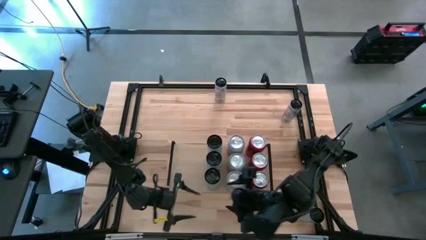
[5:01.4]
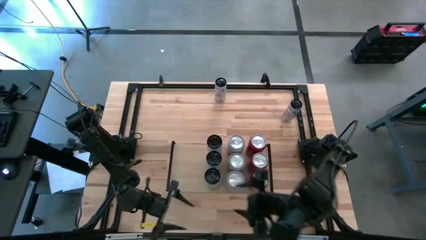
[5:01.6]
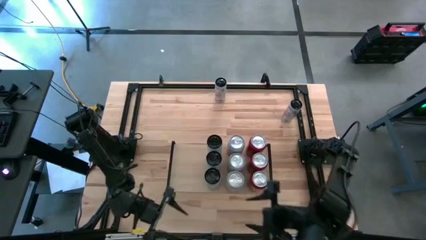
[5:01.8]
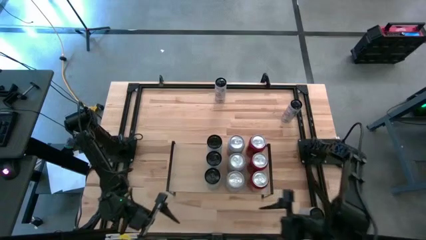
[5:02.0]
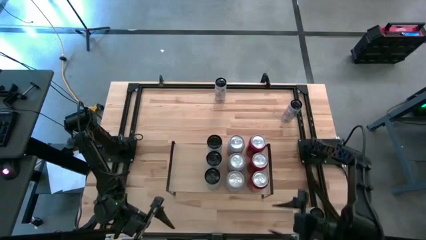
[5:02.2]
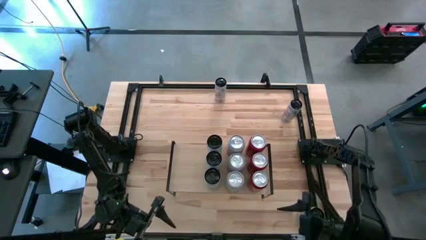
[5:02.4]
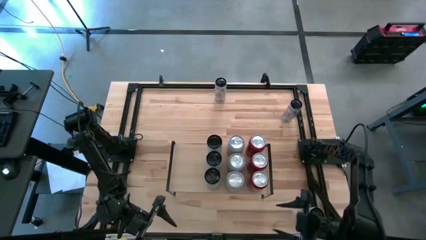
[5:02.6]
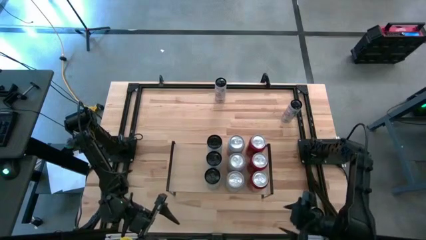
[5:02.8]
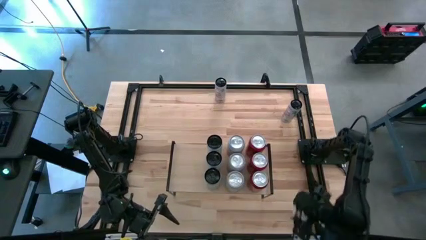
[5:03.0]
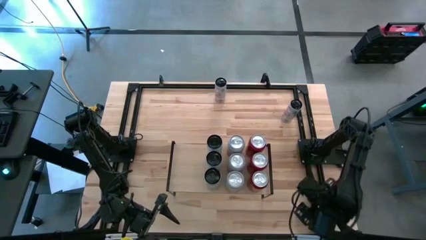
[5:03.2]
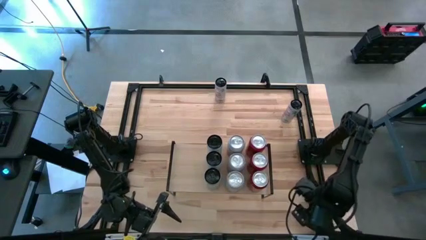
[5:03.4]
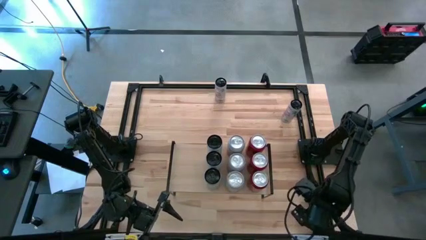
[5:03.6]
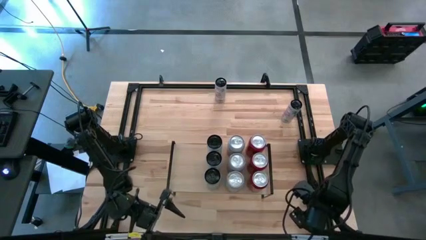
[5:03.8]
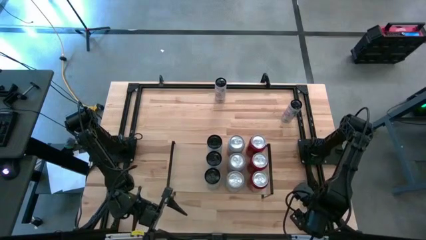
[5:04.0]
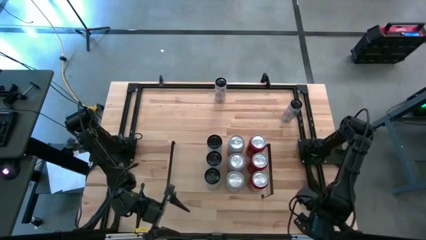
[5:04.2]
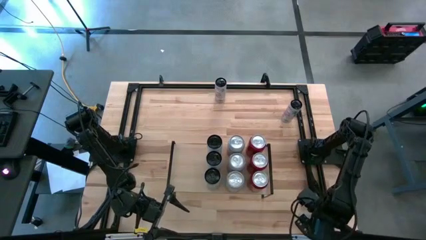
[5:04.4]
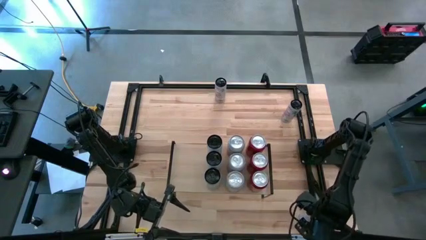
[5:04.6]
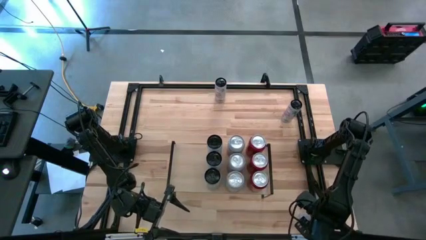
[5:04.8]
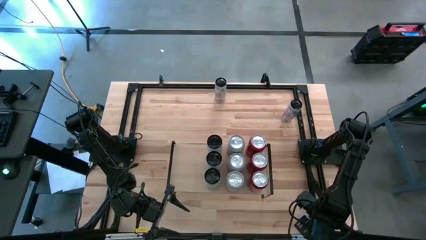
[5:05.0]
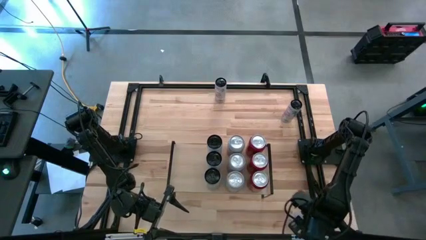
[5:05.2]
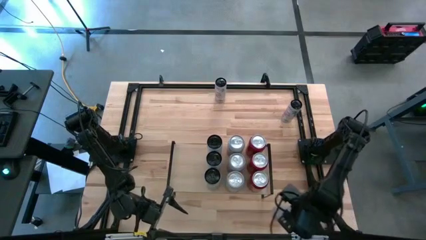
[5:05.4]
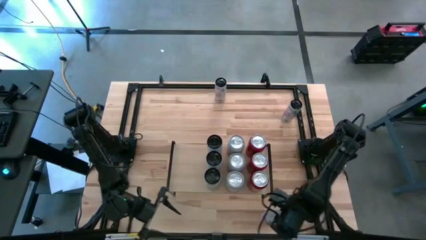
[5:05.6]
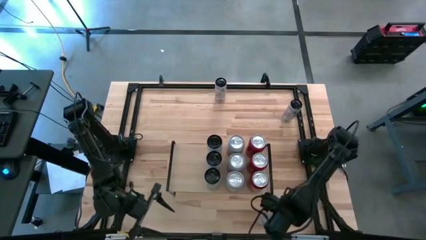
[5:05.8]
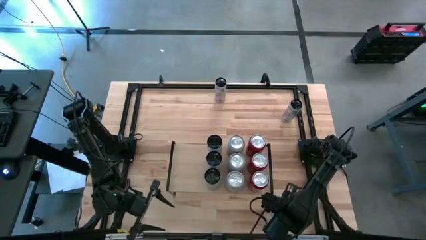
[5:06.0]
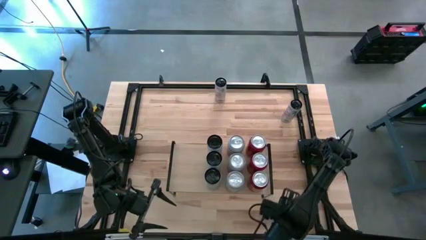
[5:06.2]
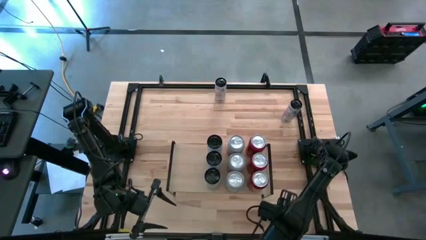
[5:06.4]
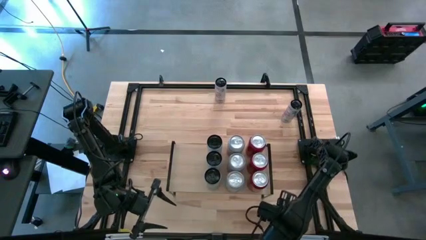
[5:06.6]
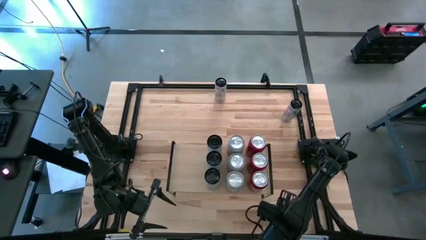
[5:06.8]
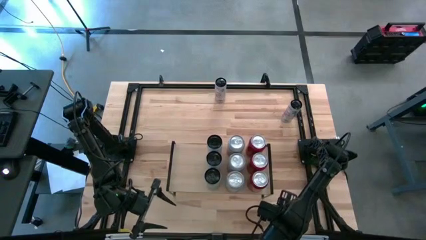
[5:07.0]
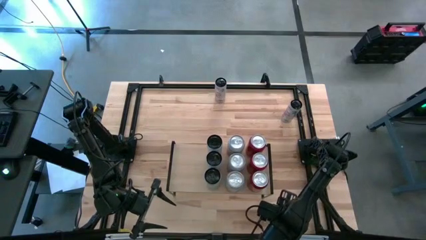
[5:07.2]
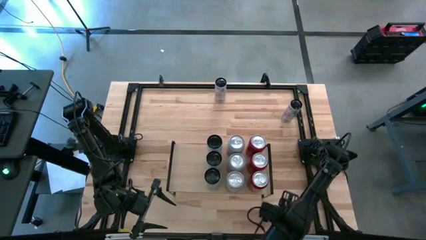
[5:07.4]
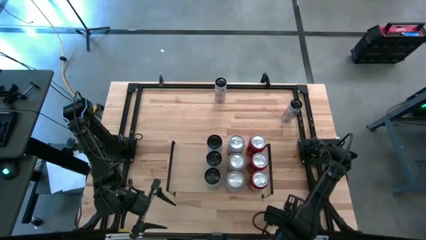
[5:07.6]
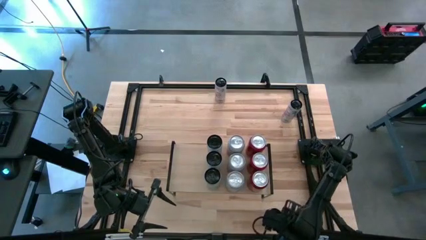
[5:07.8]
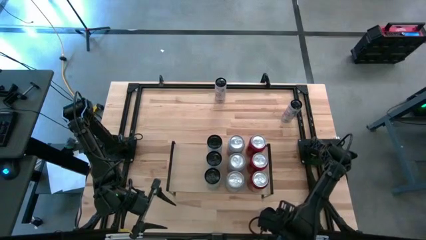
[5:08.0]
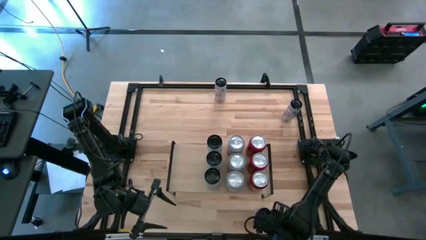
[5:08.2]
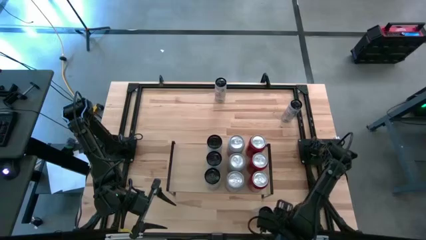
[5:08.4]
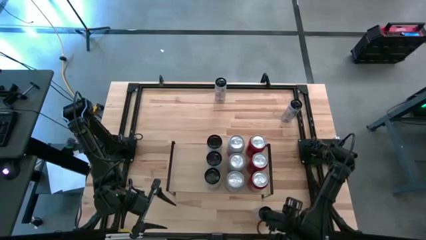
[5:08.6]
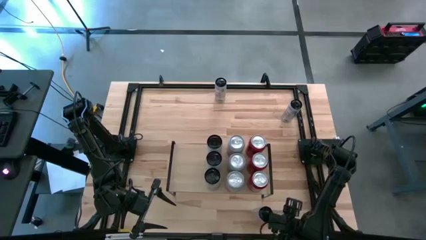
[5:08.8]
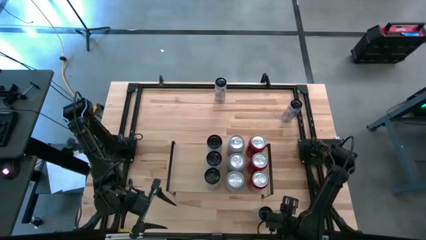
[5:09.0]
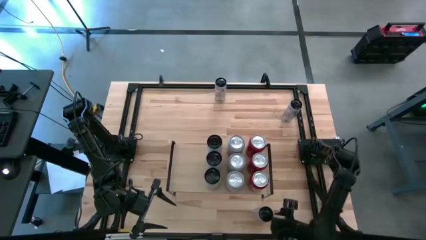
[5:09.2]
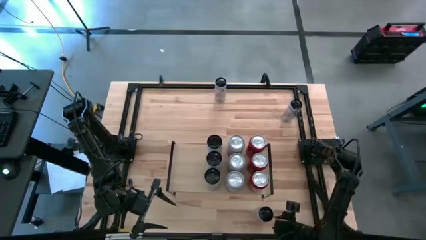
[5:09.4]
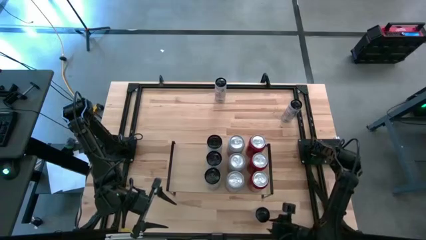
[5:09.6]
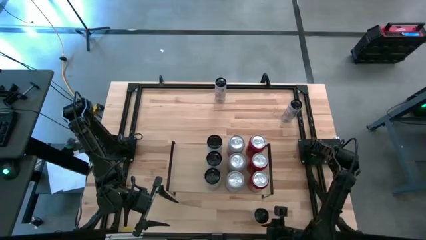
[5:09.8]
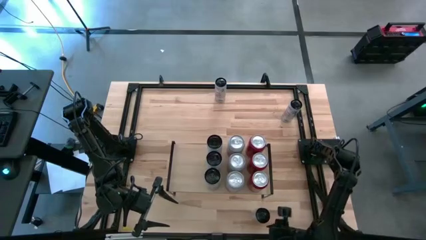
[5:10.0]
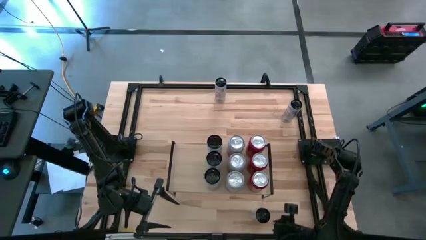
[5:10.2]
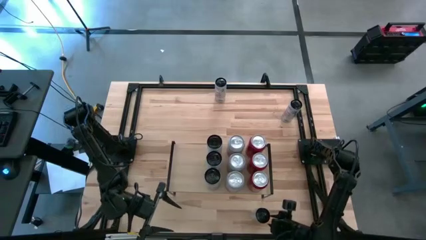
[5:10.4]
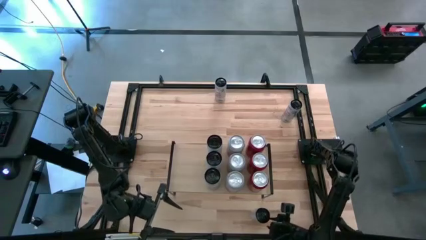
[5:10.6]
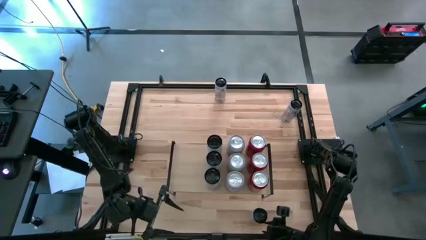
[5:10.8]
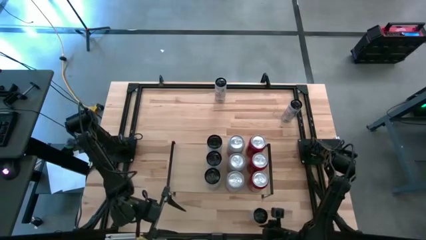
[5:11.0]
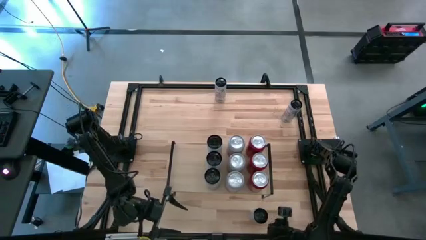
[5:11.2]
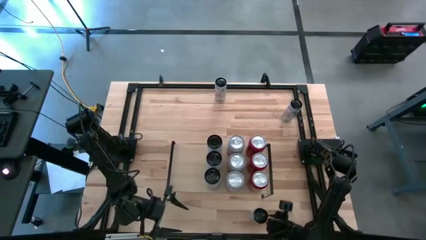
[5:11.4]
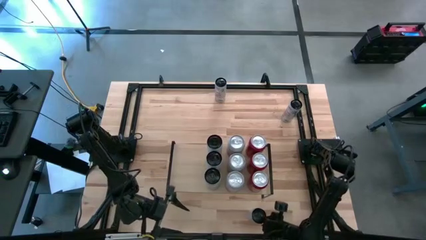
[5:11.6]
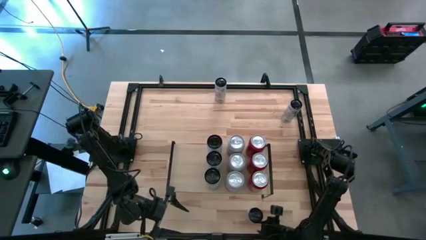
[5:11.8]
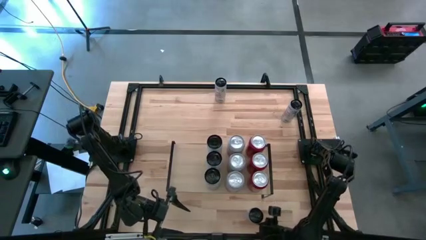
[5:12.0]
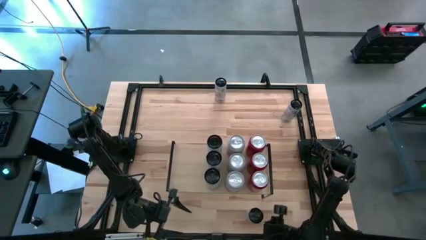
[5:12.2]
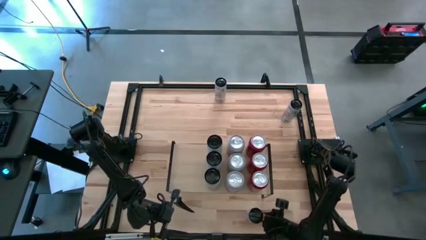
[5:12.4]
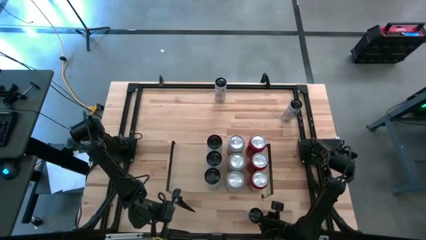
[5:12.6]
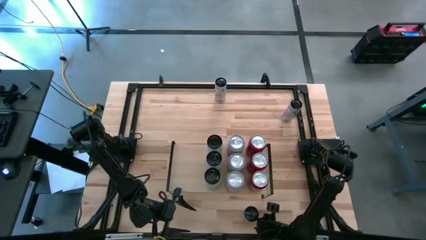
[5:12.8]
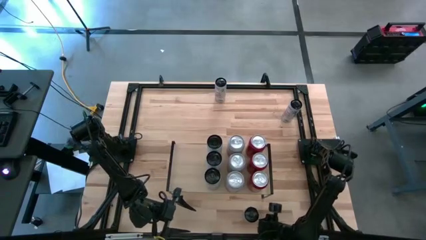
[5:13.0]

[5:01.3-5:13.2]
Task: Place canned beverage on shelf
Put the bottom white-pink soda can on the shelf
